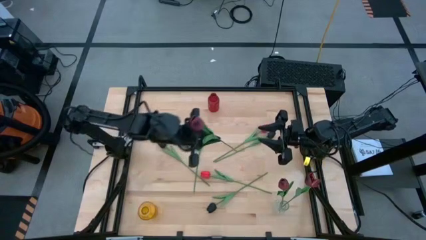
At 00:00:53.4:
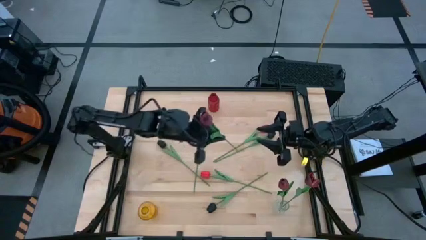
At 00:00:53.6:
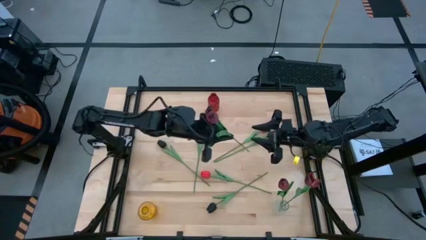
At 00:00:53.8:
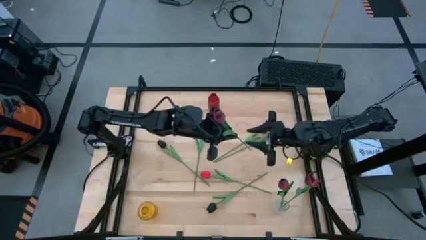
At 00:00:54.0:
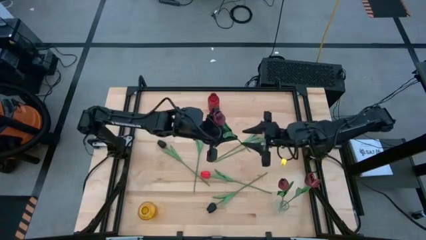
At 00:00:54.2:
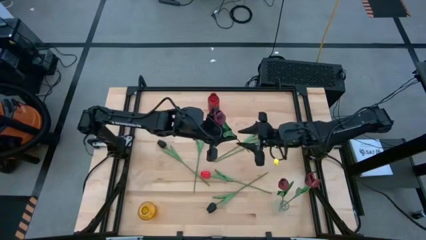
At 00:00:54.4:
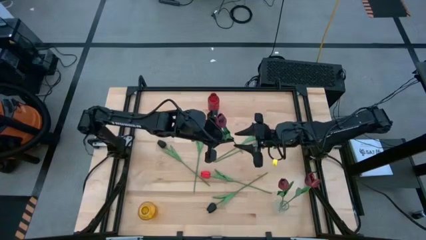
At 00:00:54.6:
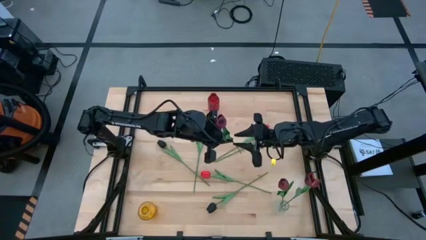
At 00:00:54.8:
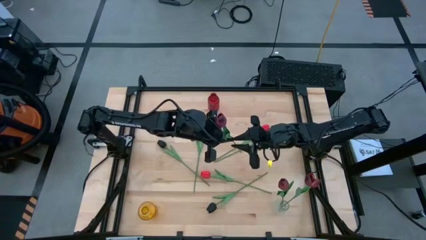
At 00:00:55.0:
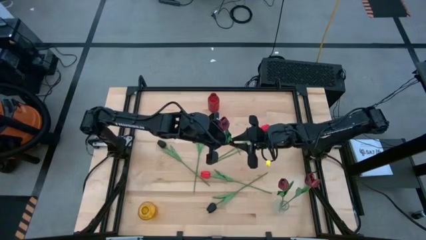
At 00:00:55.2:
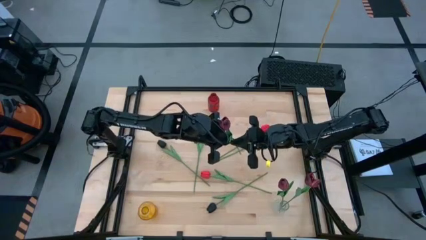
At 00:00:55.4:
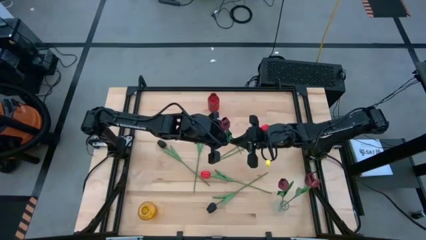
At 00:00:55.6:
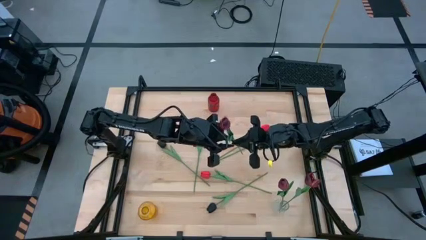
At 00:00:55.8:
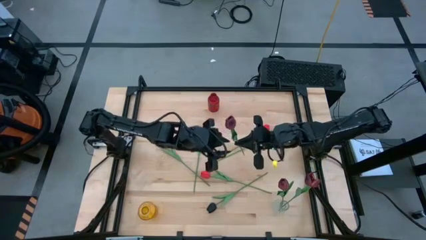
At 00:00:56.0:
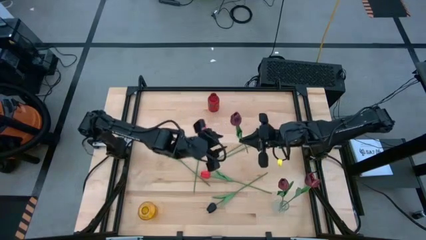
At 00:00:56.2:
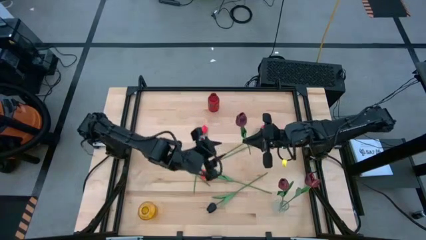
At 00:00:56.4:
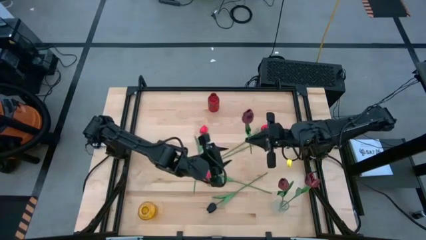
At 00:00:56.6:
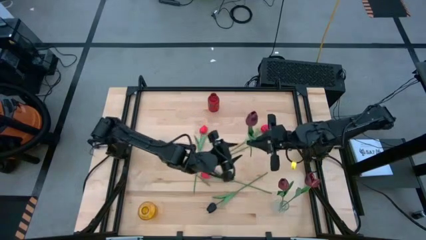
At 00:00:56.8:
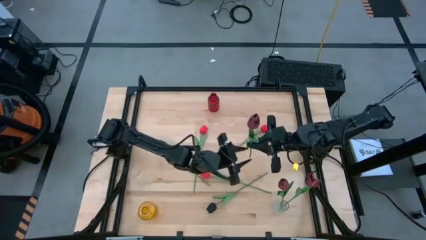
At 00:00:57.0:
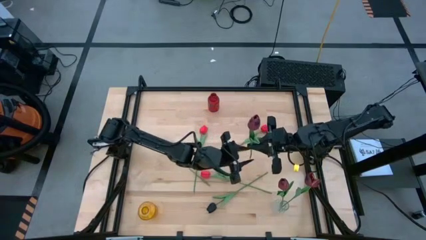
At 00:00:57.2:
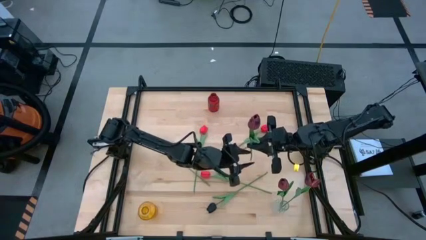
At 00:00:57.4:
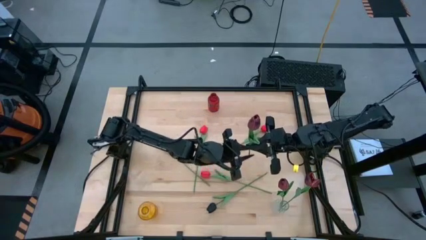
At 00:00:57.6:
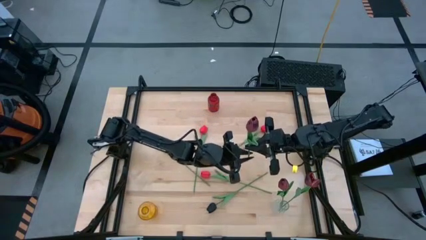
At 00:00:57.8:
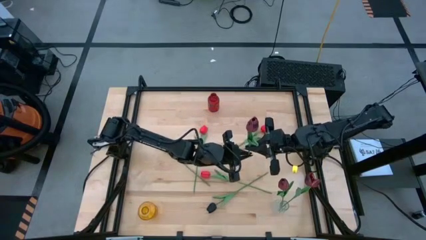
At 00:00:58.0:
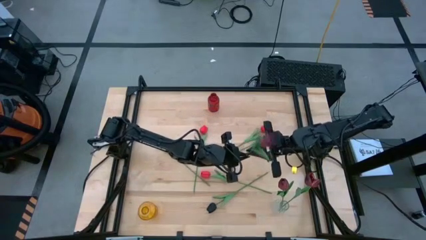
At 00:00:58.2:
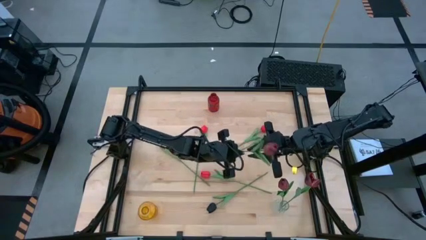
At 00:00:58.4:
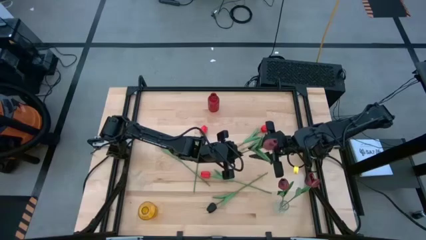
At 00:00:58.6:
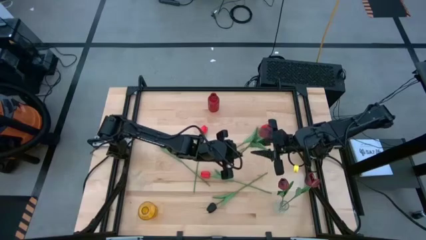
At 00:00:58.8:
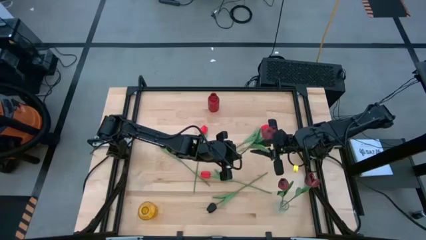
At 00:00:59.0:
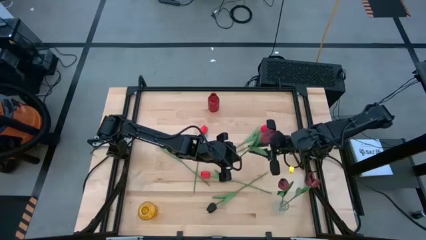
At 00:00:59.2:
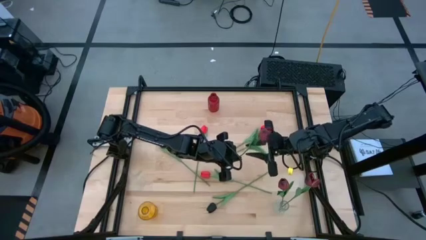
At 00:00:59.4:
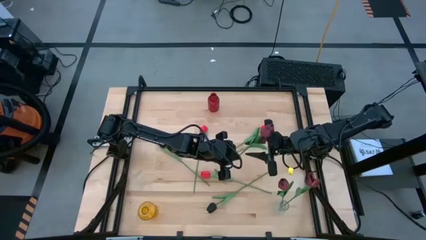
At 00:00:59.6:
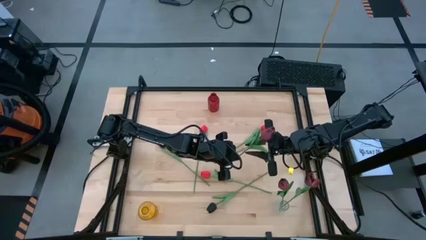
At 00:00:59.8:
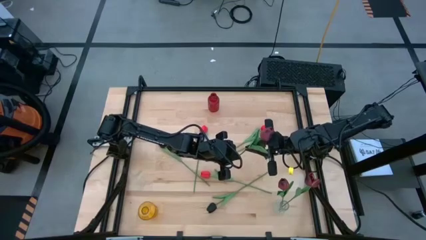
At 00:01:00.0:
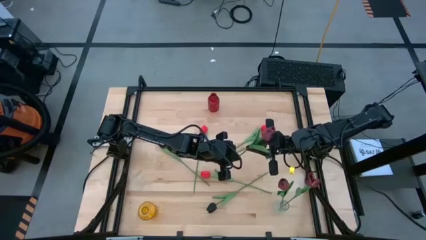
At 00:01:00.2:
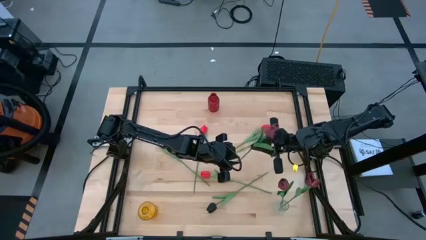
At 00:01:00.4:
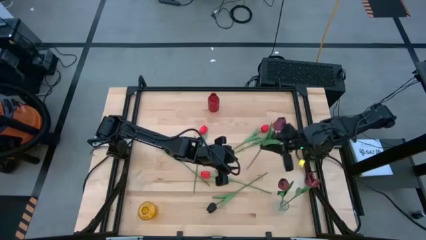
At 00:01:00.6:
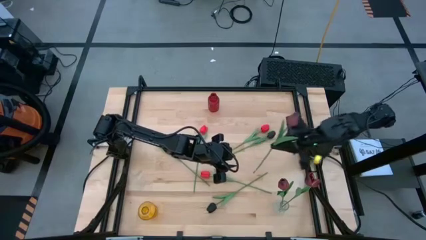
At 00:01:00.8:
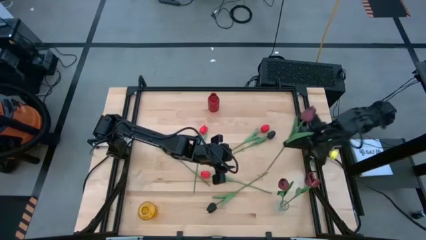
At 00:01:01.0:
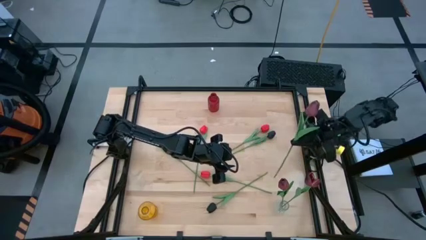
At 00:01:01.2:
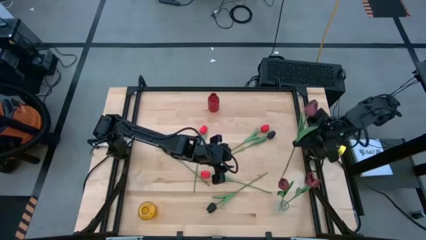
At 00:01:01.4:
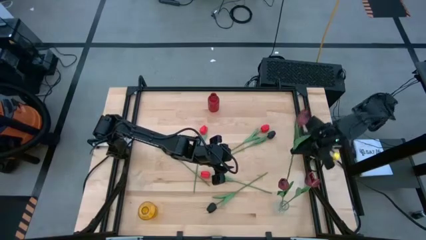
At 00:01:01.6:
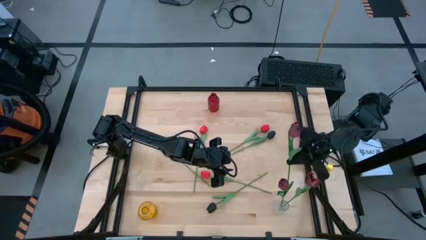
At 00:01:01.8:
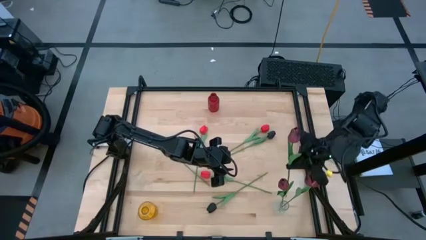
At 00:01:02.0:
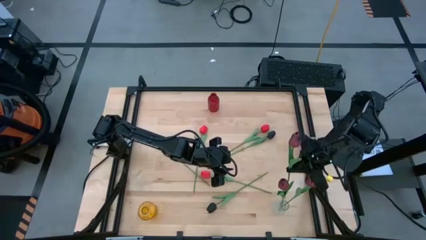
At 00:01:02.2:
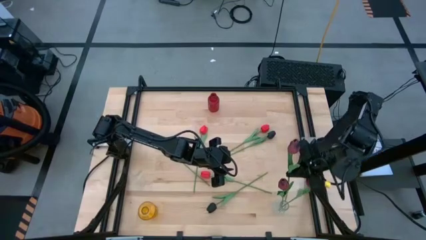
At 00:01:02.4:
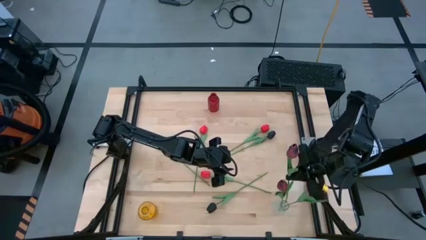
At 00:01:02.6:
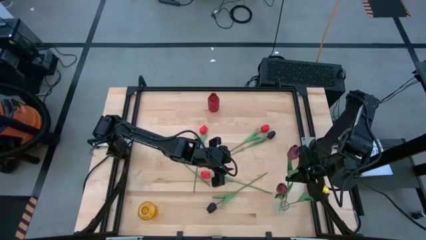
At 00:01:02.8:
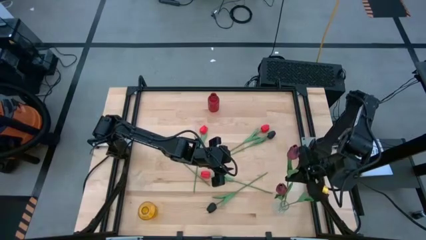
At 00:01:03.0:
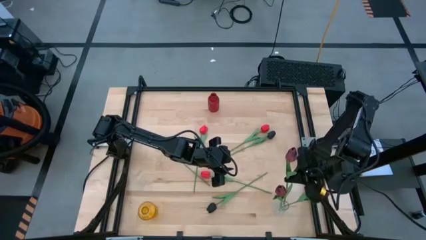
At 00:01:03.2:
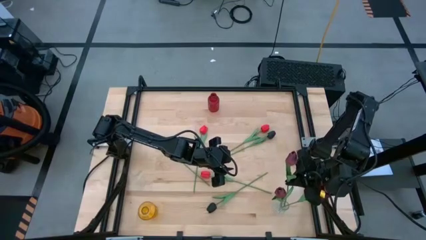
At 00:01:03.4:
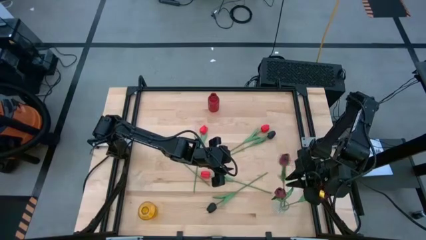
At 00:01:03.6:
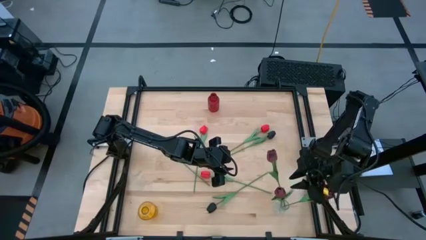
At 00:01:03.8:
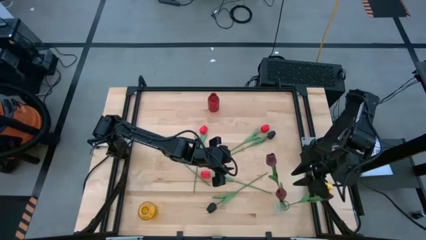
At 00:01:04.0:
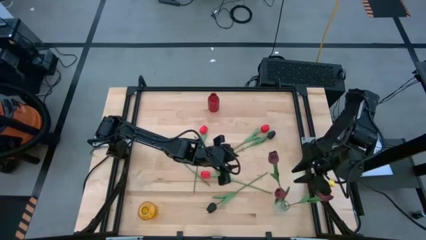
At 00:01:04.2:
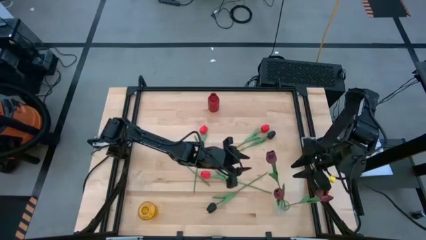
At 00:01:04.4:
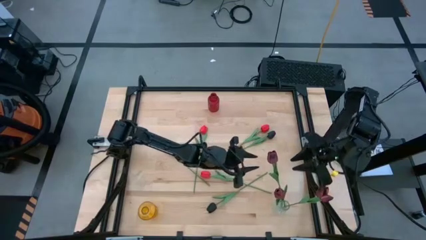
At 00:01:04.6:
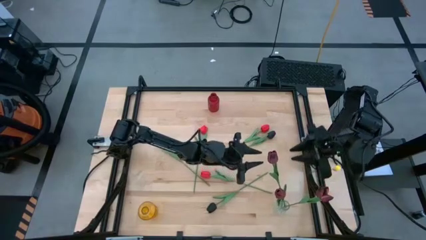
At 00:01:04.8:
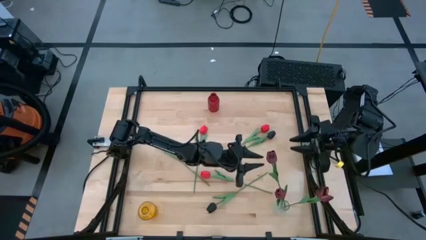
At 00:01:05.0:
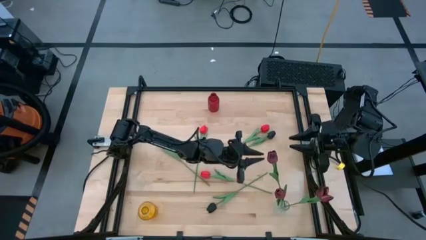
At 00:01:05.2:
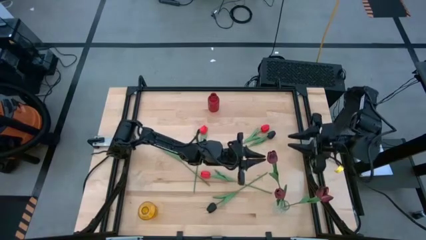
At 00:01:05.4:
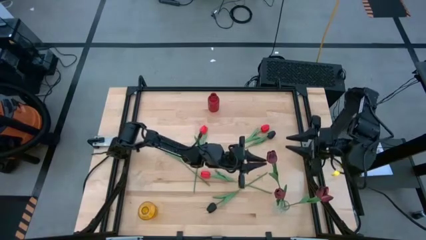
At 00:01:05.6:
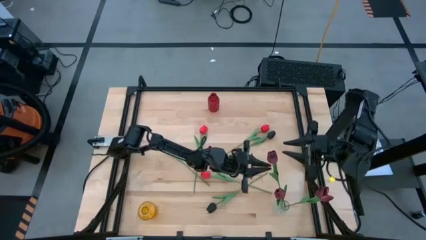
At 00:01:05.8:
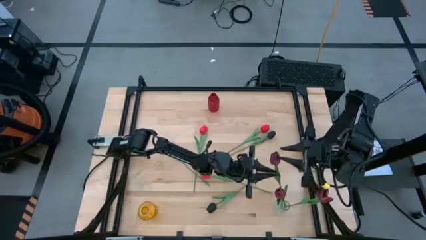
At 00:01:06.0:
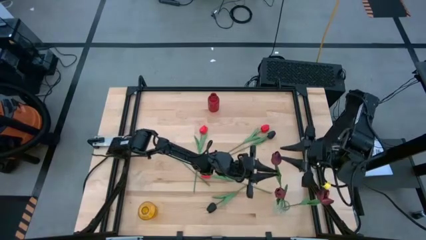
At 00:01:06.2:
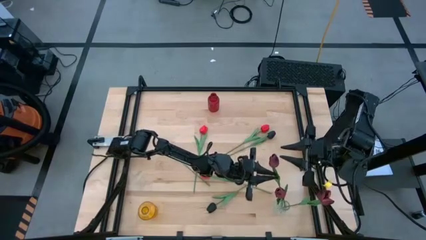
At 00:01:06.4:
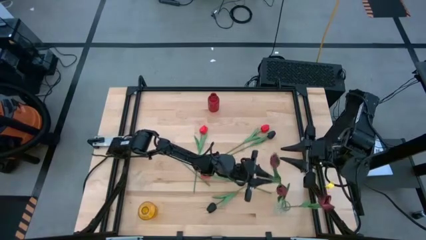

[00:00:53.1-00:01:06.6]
Task: Sort flowers into vase by color
Put the dark red flower into the transparent vase

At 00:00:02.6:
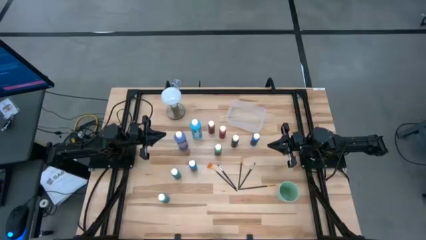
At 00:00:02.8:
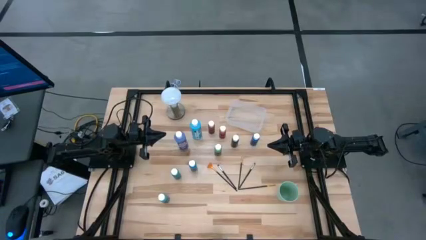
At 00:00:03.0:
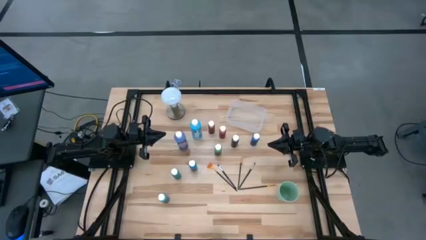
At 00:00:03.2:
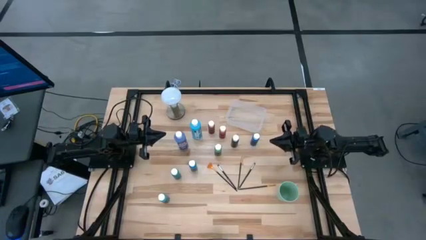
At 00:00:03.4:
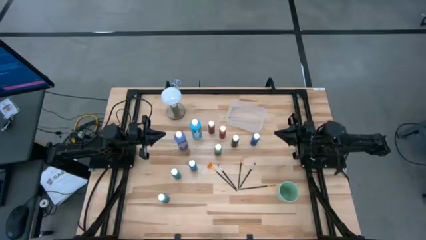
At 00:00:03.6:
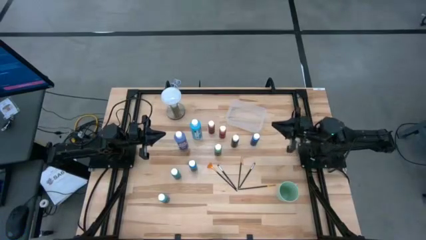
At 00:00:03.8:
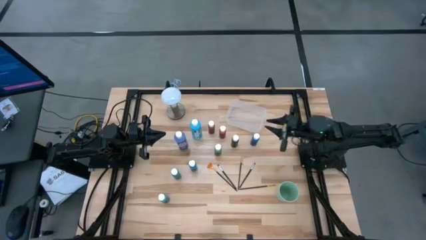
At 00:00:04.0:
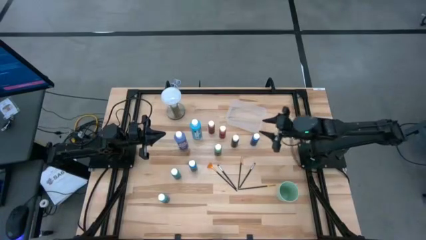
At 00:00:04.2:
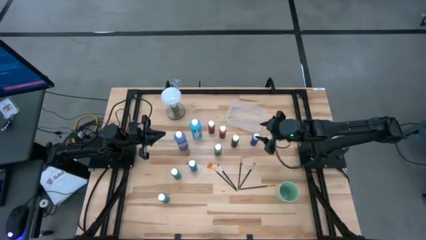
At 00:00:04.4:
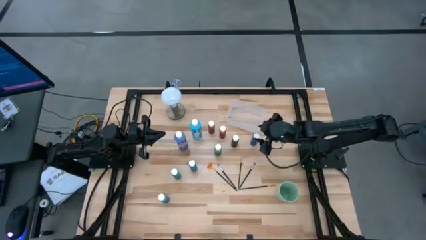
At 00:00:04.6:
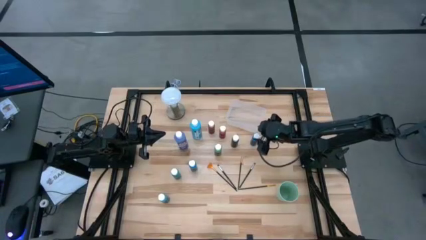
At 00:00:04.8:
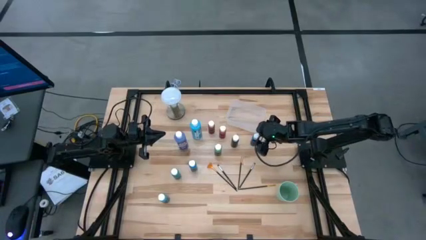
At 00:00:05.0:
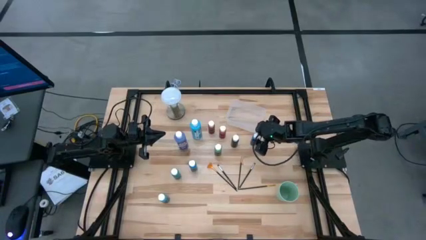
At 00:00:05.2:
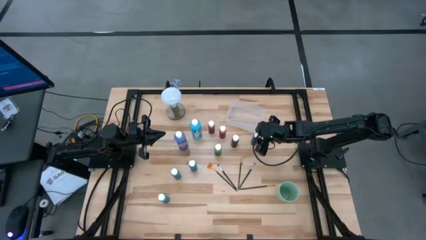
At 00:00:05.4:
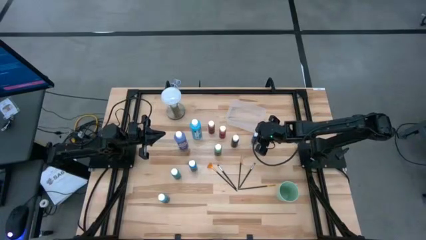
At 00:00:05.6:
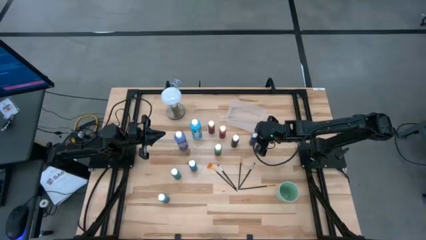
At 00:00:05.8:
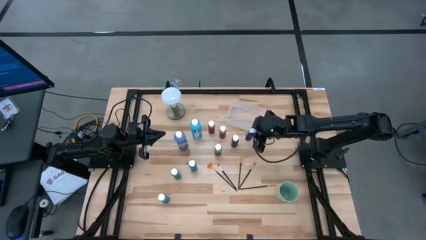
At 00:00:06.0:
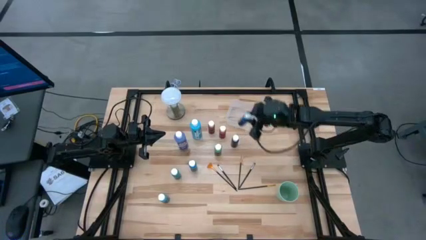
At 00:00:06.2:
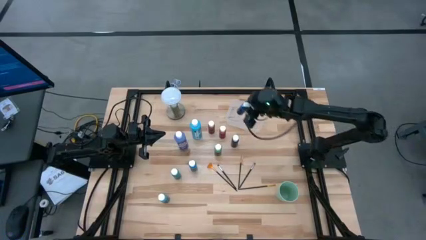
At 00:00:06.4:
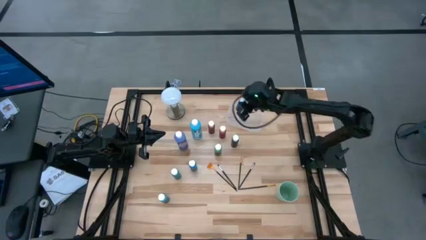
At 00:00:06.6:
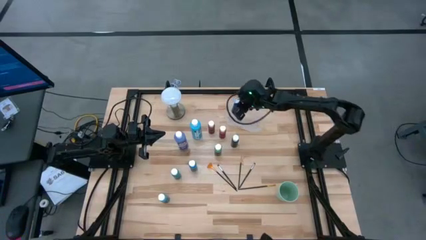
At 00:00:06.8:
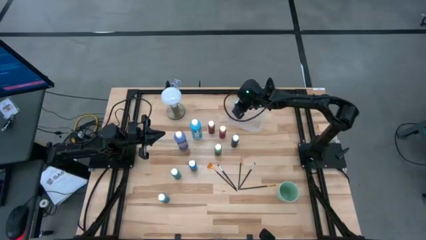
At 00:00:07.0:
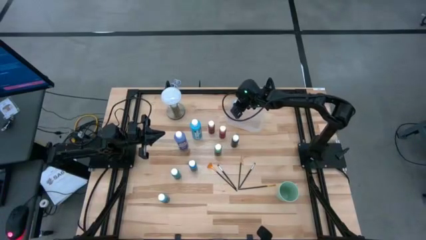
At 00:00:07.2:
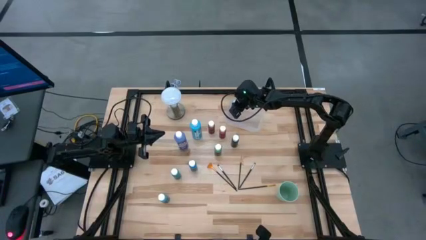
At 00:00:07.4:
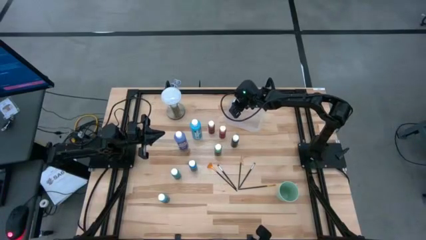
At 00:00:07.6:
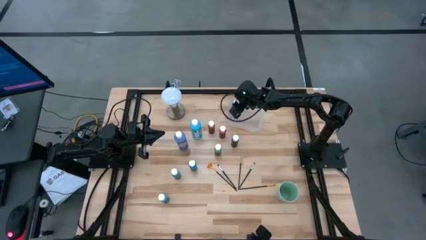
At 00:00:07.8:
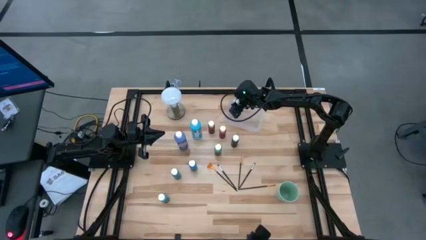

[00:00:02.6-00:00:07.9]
Task: Pick & Place Paint Supplies
Put the small blue paint bottle into the transparent bin
